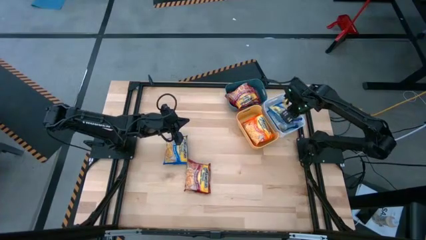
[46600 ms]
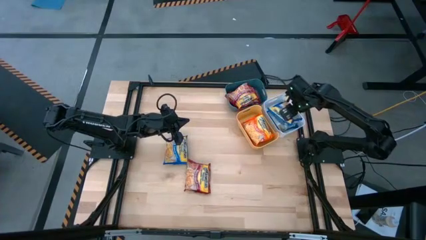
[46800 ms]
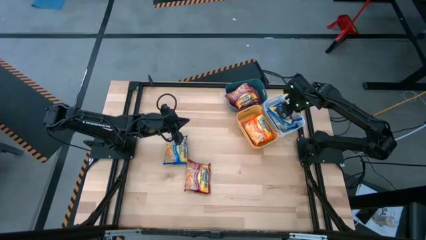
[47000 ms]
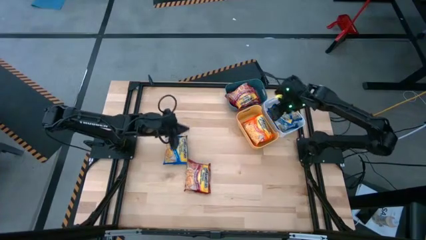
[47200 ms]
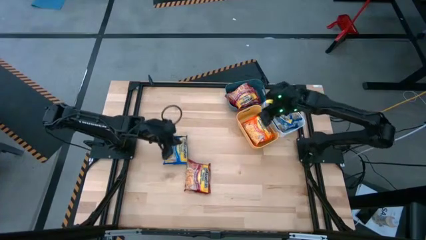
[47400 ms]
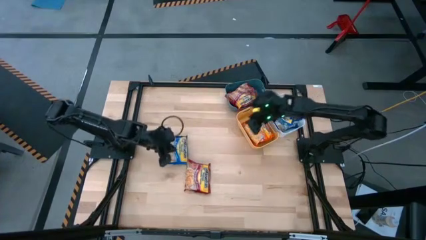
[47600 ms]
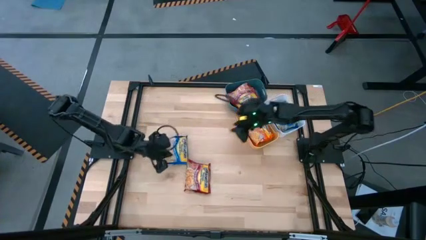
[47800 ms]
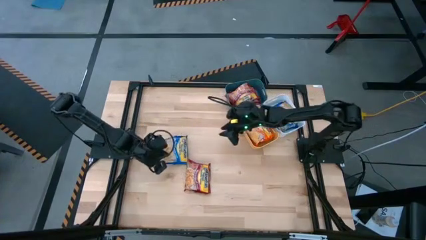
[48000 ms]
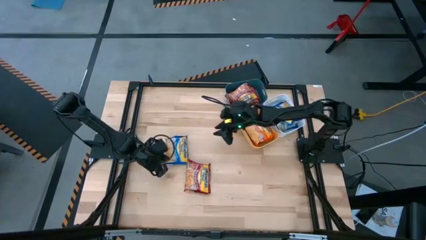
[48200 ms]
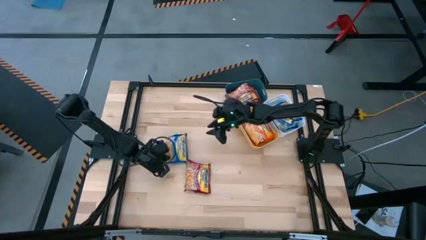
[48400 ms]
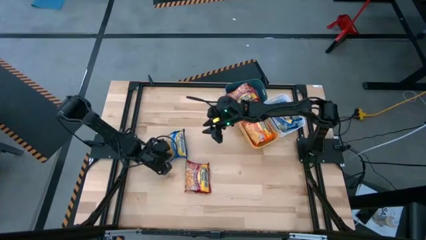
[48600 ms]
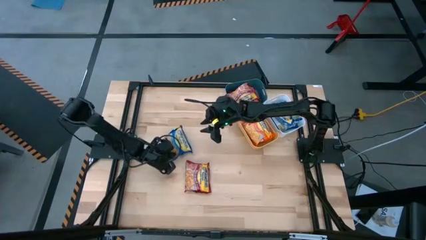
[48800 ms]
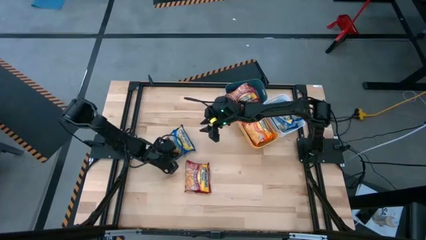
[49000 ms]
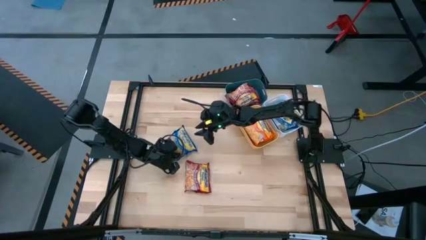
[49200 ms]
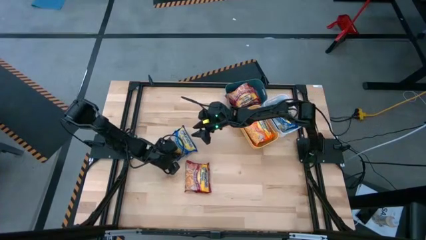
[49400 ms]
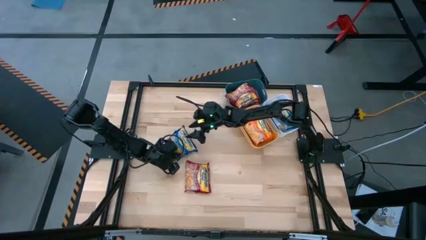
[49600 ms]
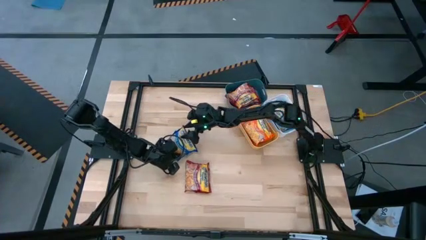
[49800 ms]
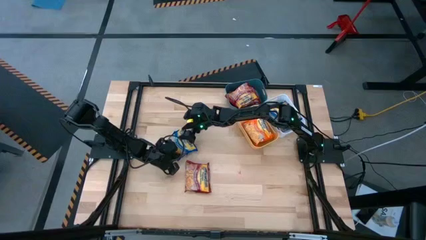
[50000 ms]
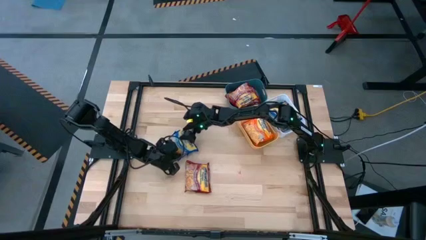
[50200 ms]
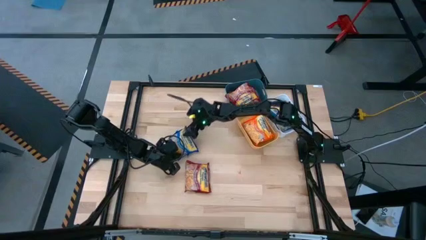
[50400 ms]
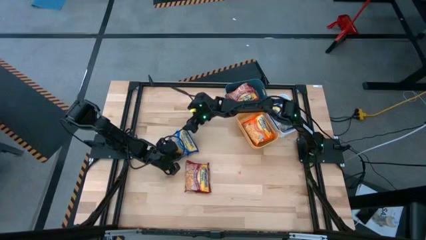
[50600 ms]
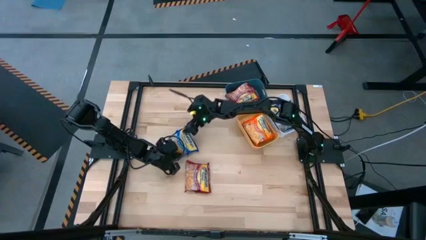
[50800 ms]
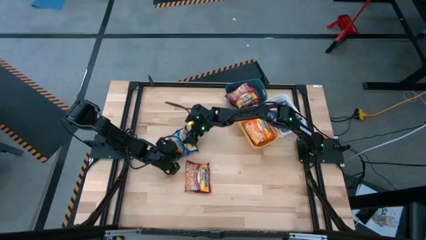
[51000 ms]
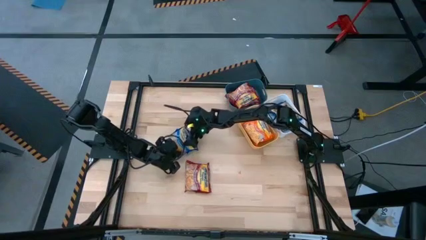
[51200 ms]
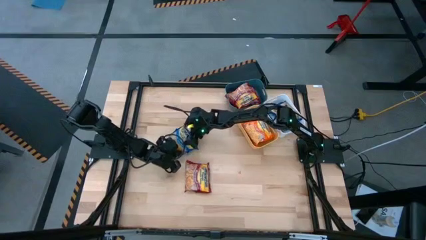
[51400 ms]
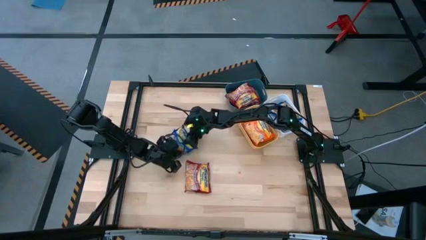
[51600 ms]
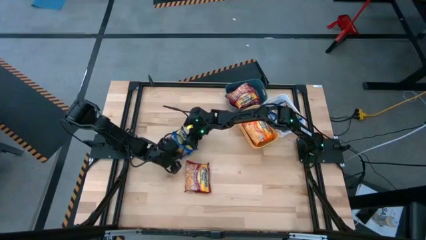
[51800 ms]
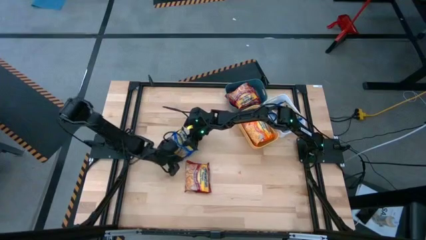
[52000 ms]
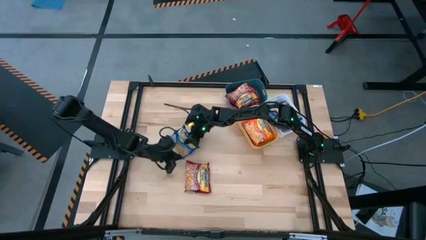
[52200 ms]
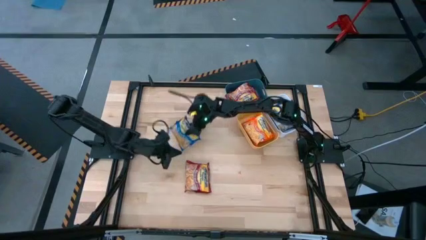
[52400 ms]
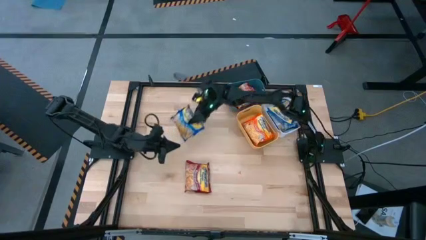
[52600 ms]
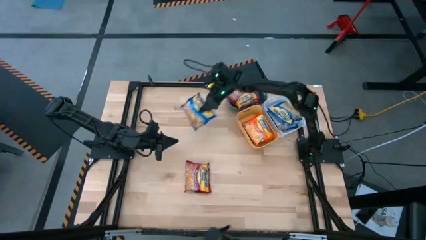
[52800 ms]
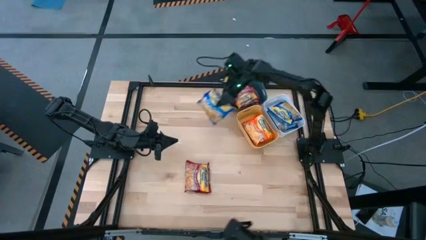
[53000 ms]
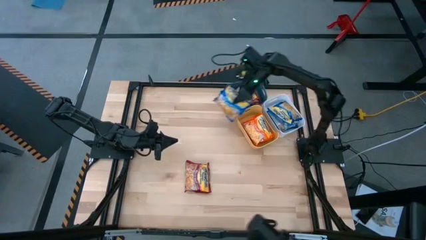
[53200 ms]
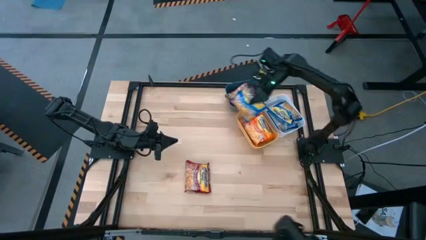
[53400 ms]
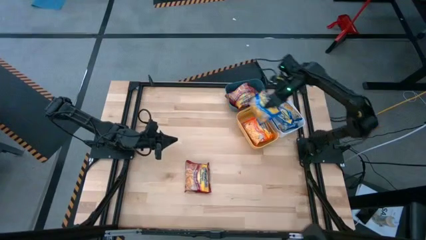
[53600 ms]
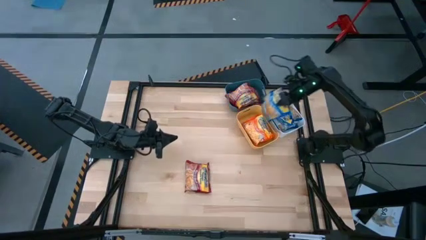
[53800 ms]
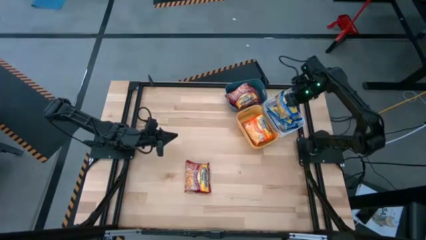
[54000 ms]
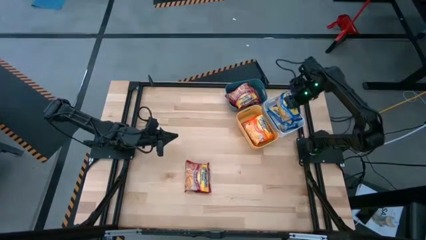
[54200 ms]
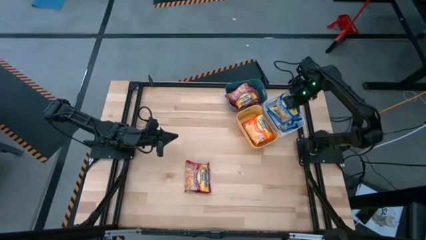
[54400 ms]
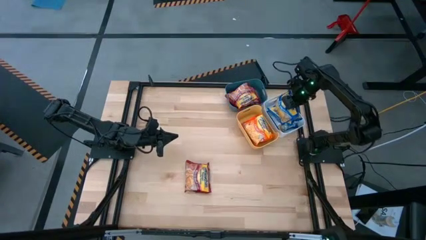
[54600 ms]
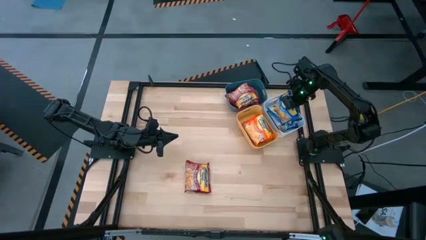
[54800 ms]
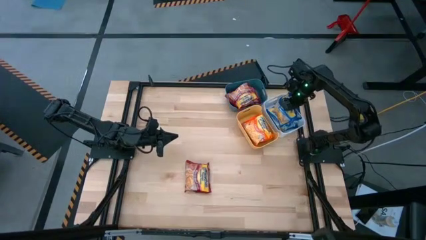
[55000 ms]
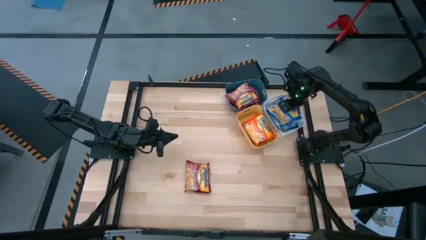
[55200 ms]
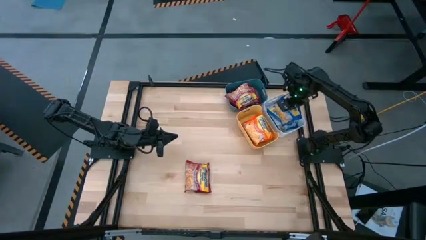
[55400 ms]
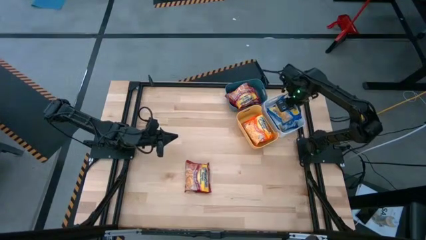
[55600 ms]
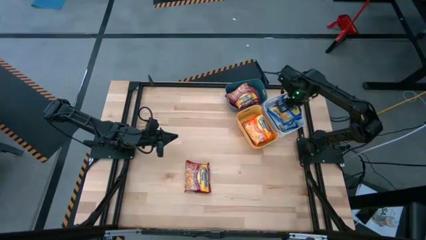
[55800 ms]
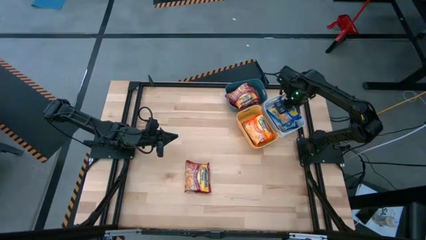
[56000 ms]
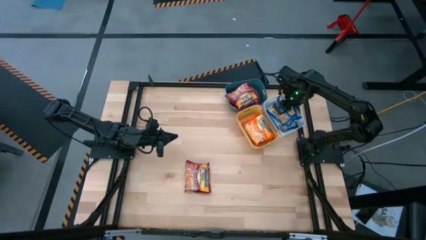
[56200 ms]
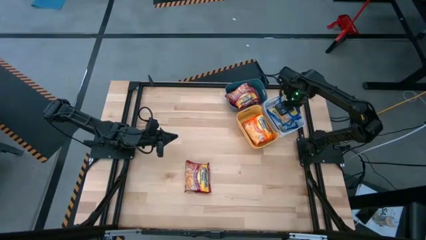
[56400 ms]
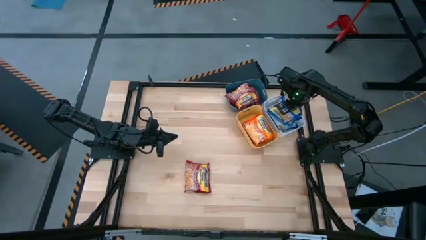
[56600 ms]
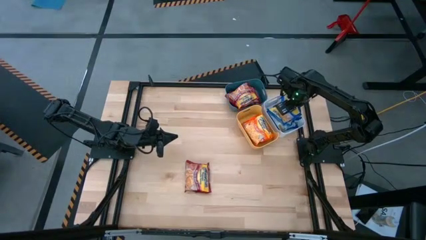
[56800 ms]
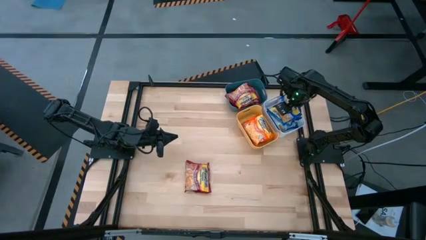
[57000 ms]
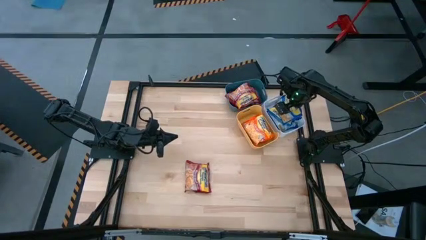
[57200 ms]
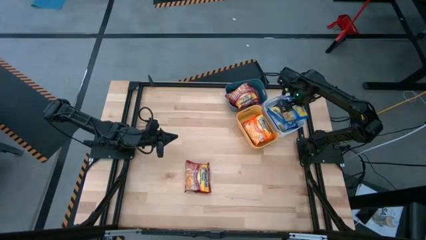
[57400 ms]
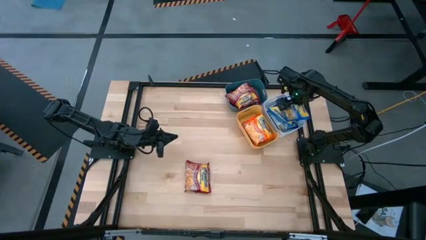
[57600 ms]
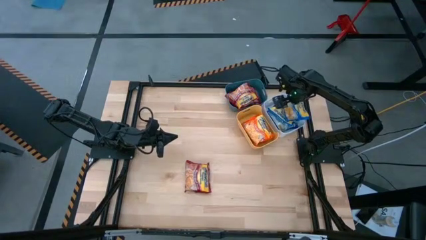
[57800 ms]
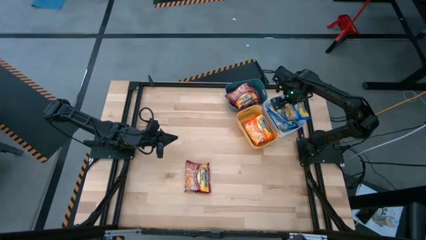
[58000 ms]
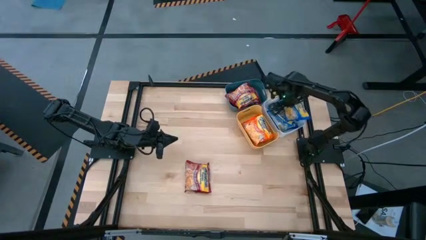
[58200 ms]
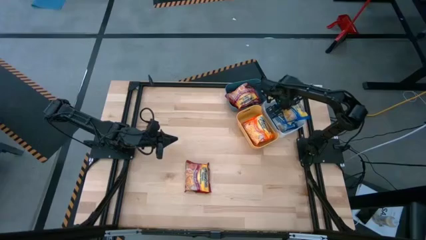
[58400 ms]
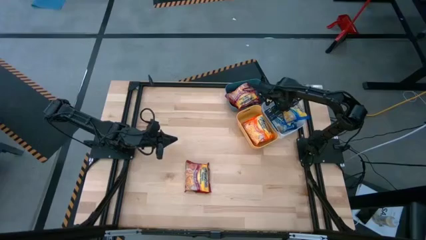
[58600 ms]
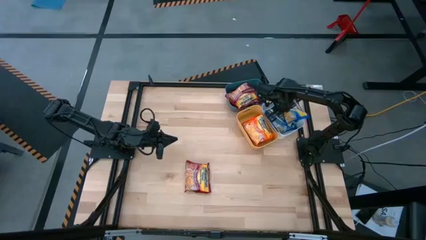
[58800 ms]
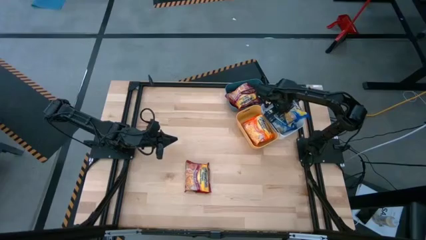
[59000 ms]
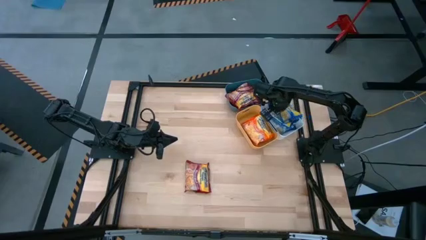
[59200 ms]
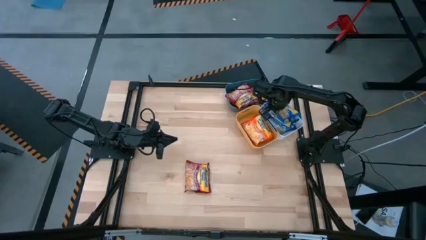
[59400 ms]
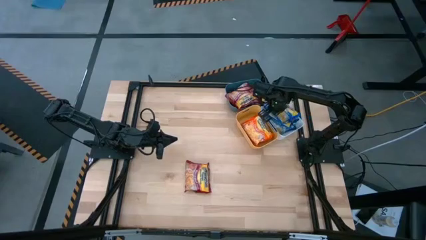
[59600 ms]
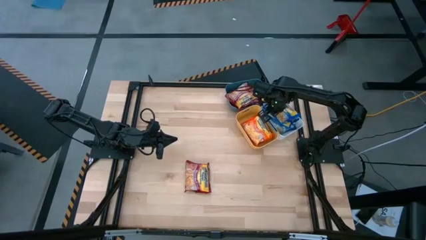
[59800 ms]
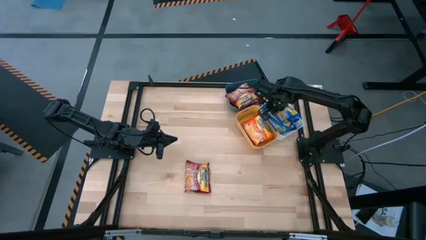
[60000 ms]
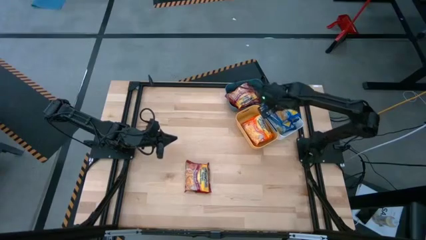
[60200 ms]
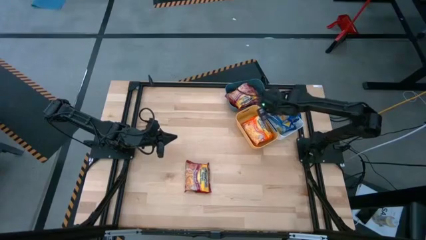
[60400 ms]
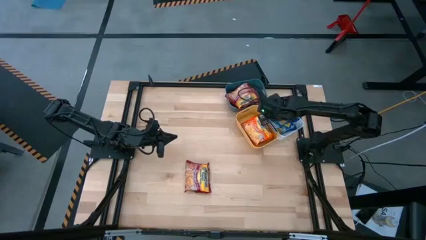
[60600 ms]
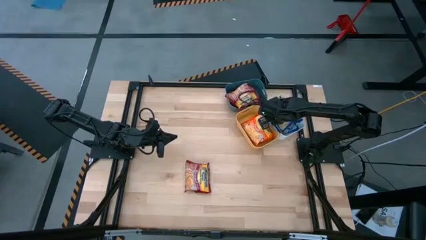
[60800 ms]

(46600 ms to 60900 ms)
Task: Sort Maruchan noodles
Put the blue noodle pack into the white bin

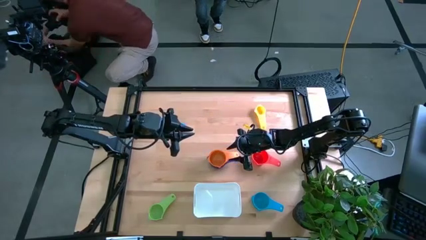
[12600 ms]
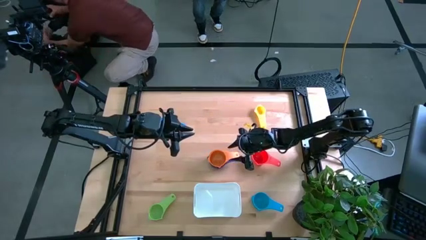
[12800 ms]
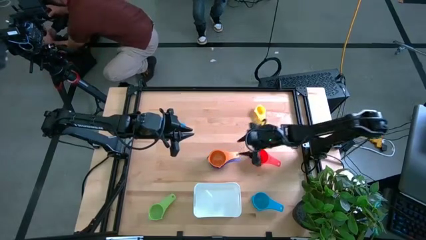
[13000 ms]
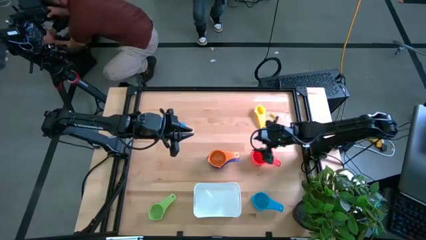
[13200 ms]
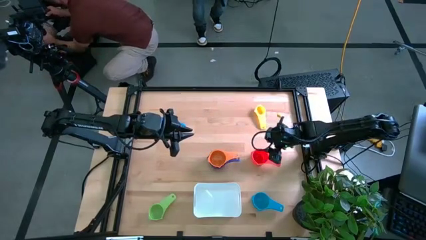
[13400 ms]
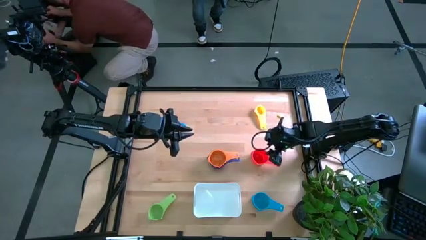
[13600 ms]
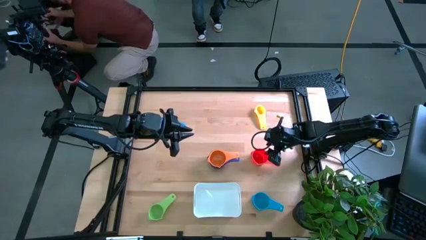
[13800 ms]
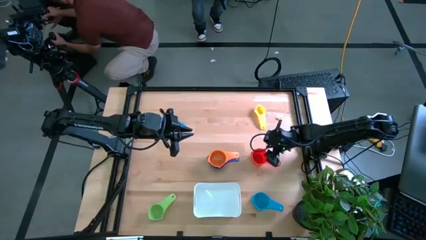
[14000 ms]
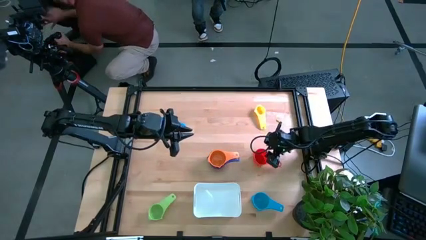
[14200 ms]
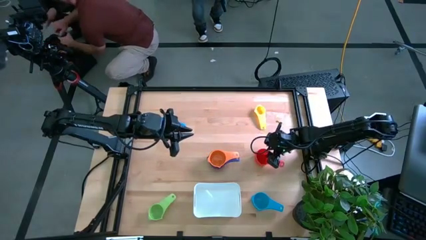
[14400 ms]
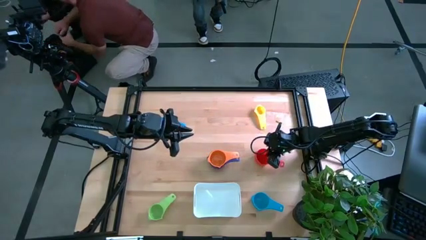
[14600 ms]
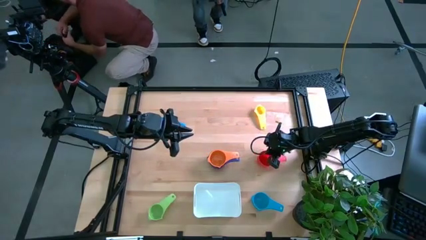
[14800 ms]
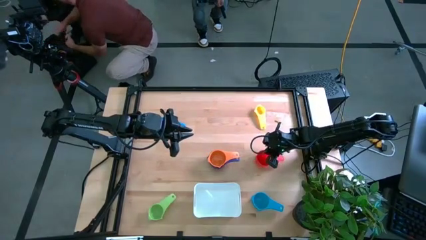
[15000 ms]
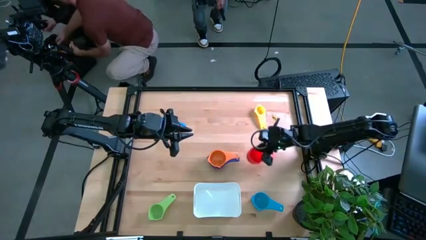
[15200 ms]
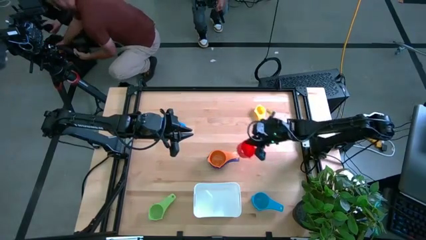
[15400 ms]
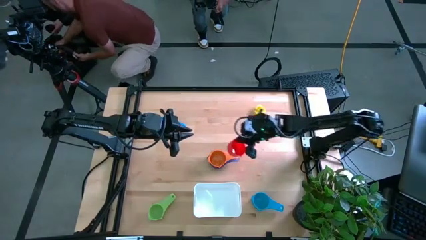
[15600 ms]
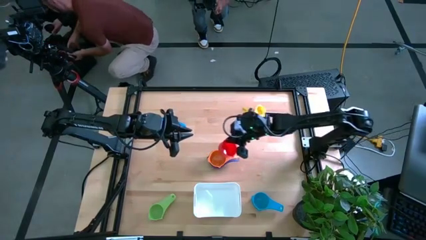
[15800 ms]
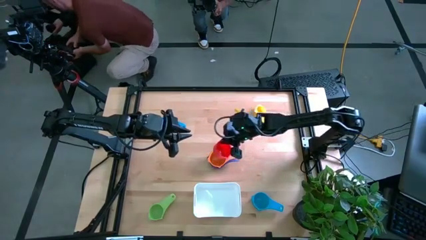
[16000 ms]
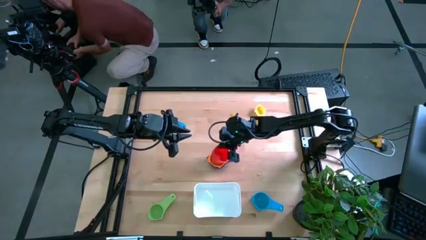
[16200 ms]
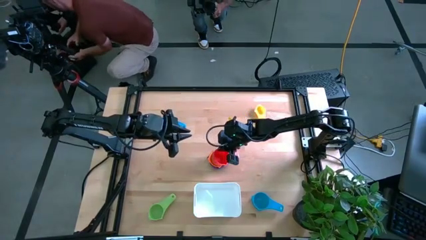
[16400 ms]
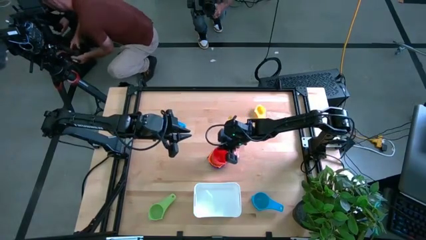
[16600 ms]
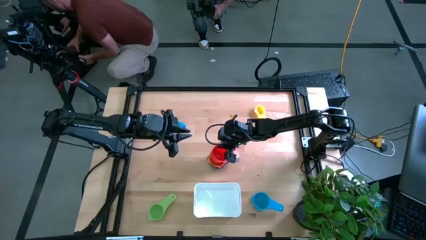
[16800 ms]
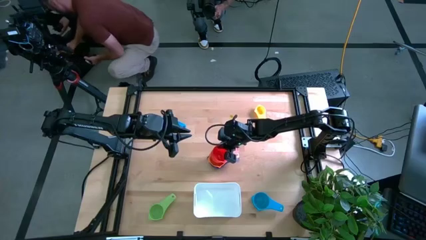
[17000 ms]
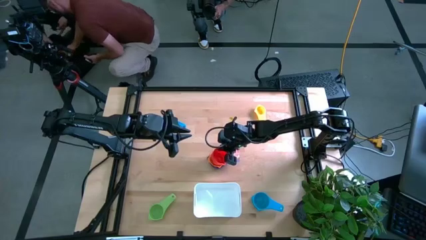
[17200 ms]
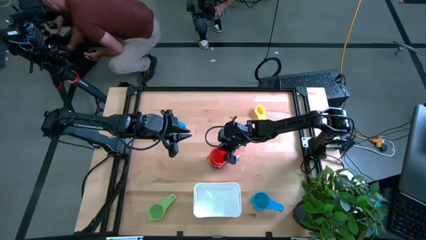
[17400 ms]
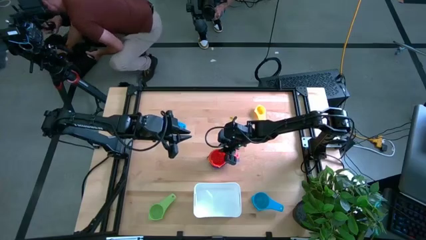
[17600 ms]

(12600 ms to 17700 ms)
Task: Nest measuring cups in basket
Stack the red measuring cup on top of the orange measuring cup
